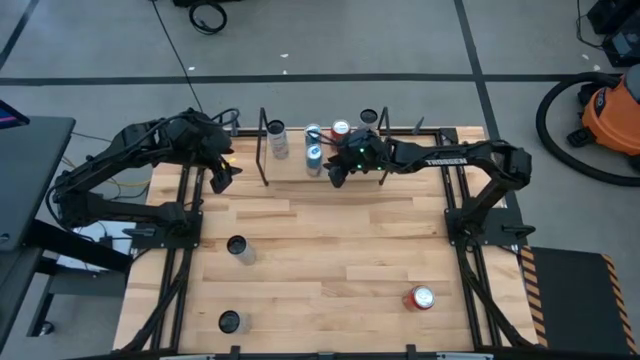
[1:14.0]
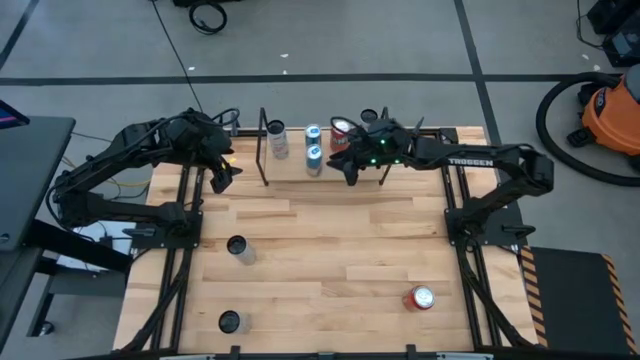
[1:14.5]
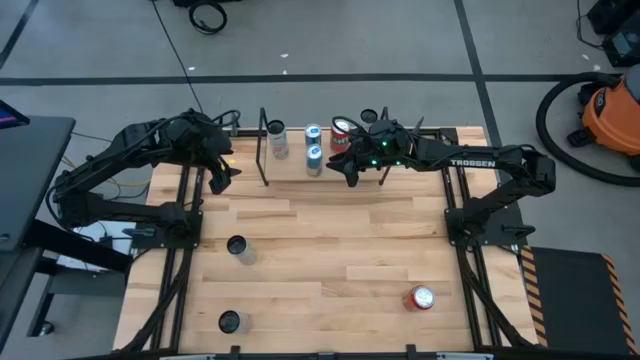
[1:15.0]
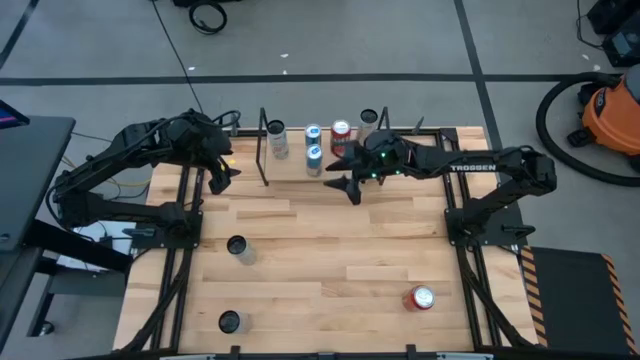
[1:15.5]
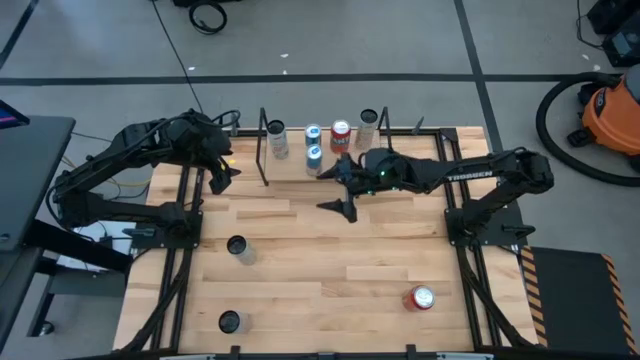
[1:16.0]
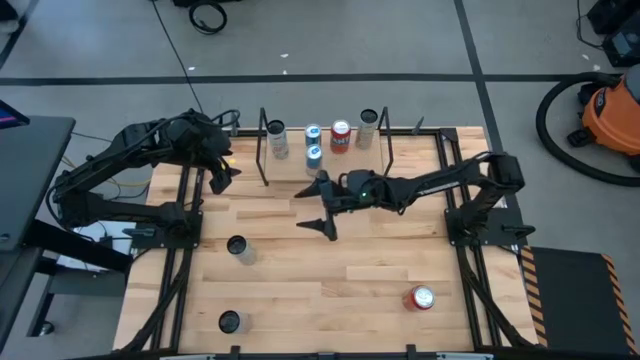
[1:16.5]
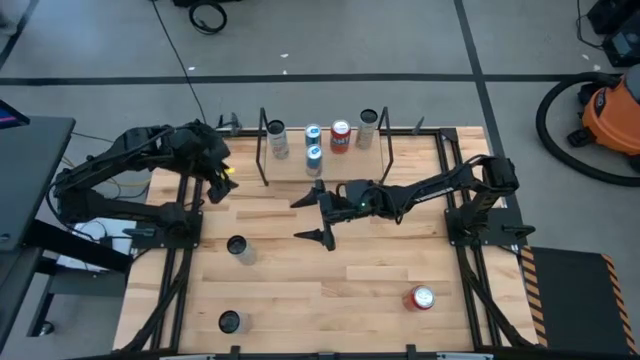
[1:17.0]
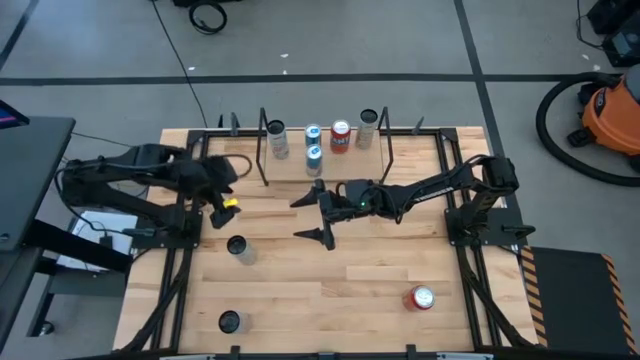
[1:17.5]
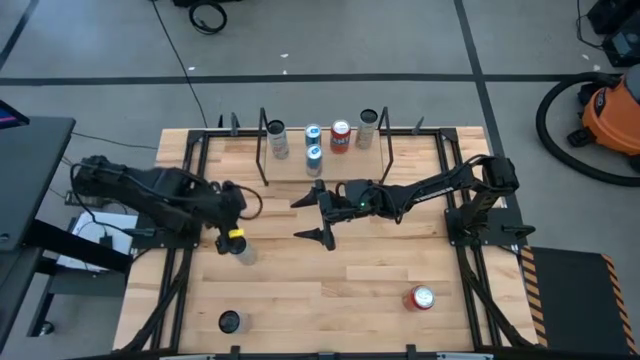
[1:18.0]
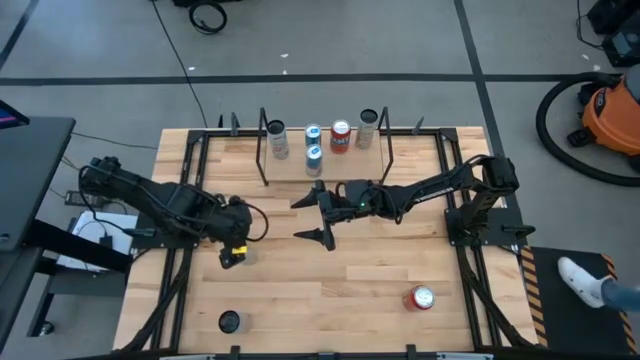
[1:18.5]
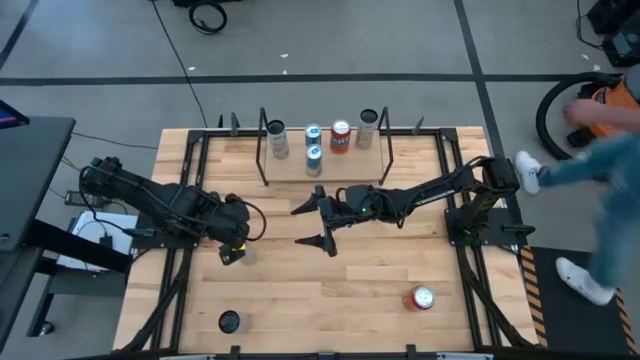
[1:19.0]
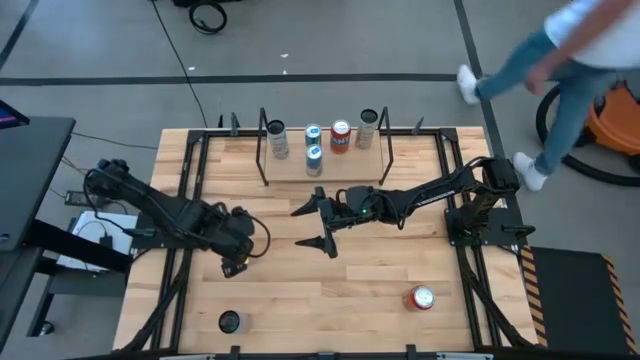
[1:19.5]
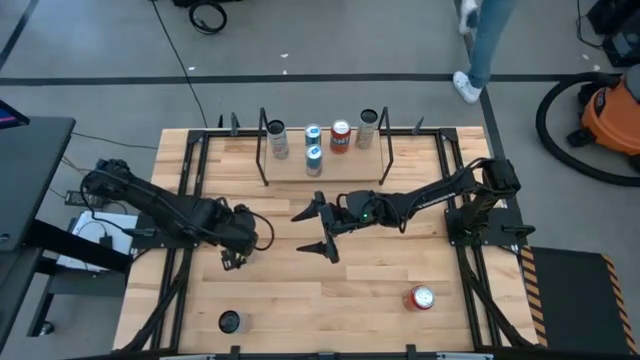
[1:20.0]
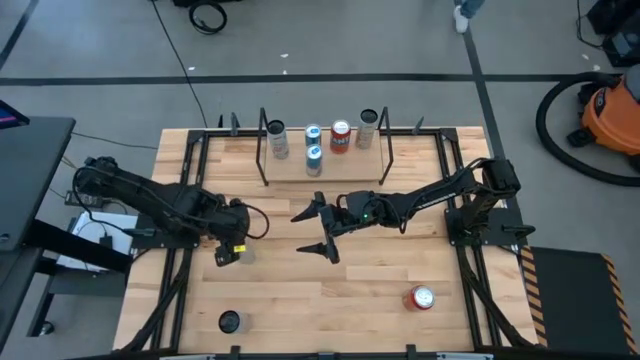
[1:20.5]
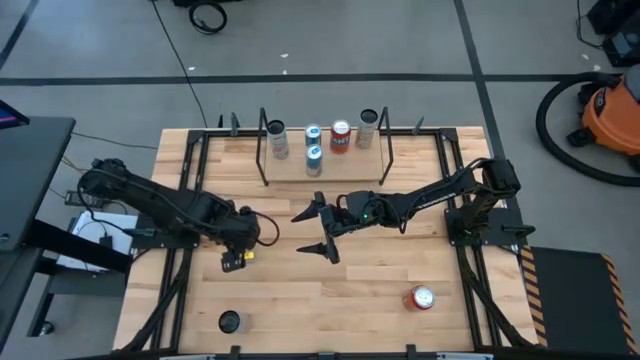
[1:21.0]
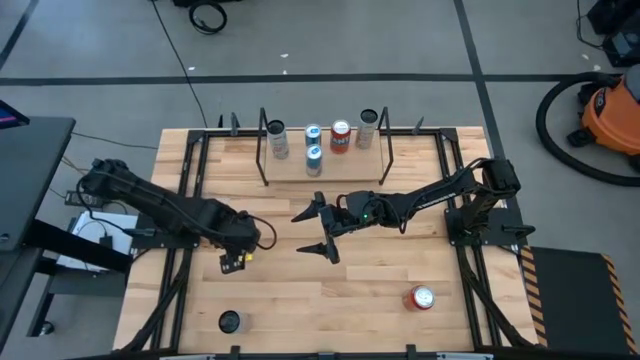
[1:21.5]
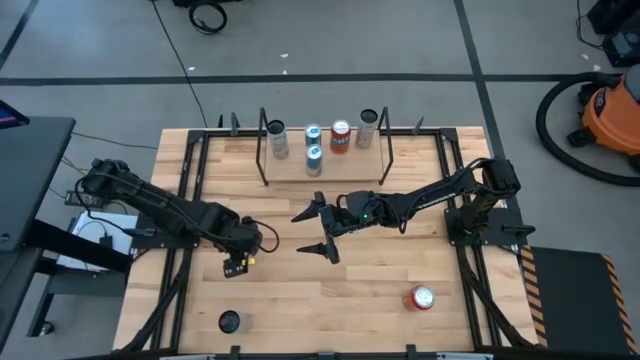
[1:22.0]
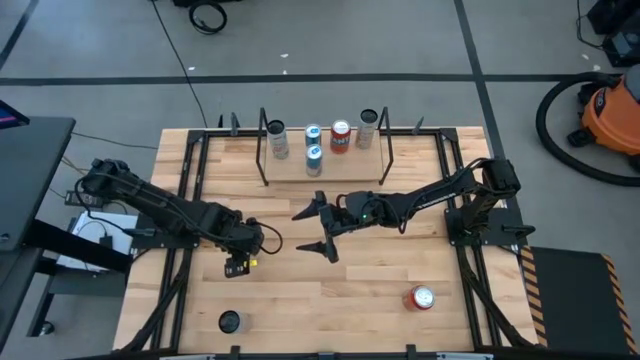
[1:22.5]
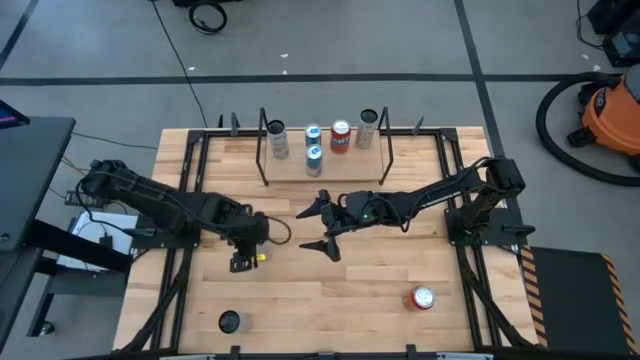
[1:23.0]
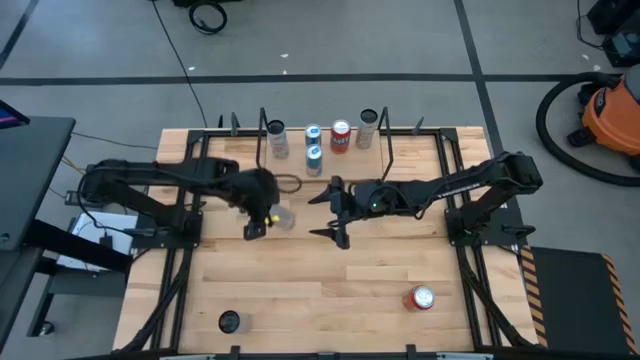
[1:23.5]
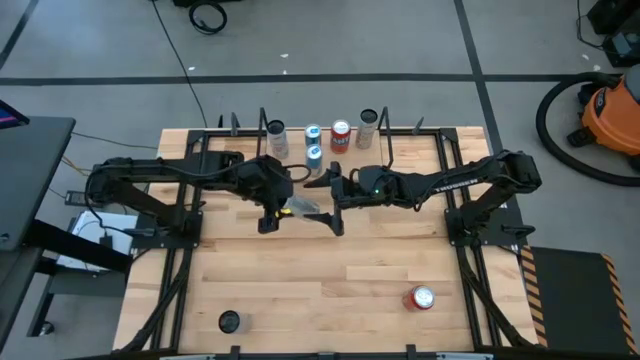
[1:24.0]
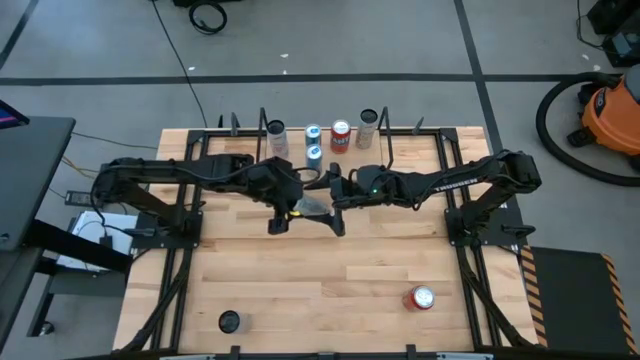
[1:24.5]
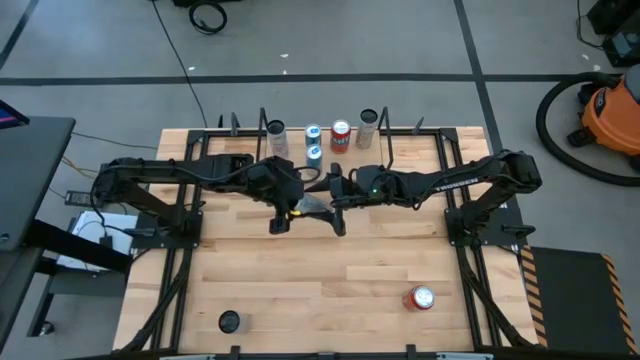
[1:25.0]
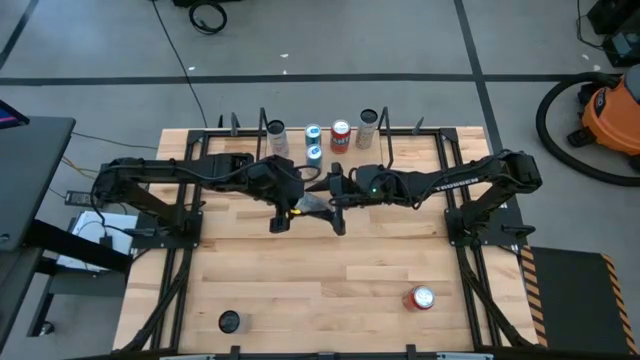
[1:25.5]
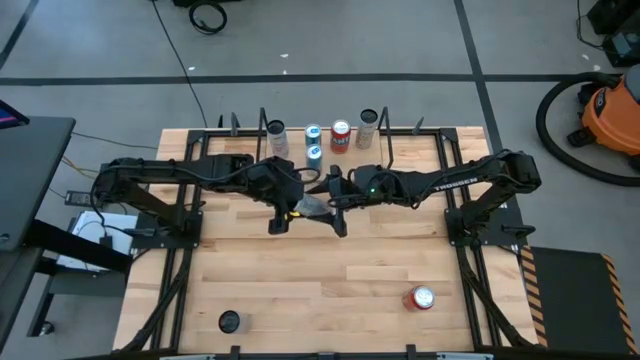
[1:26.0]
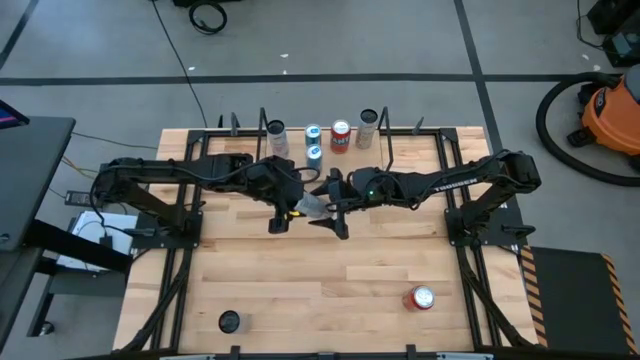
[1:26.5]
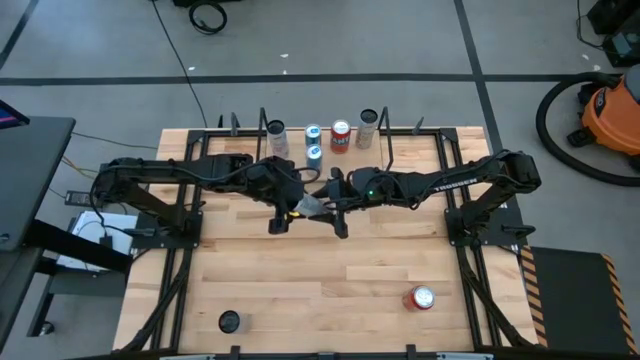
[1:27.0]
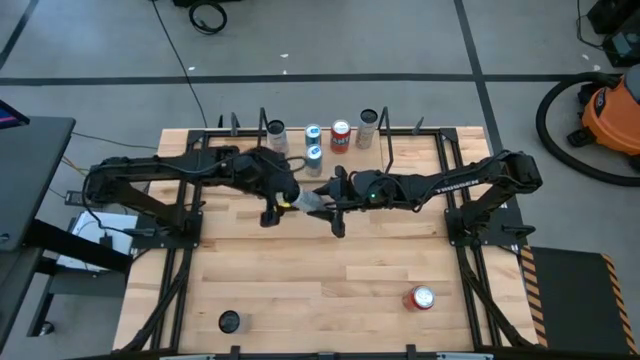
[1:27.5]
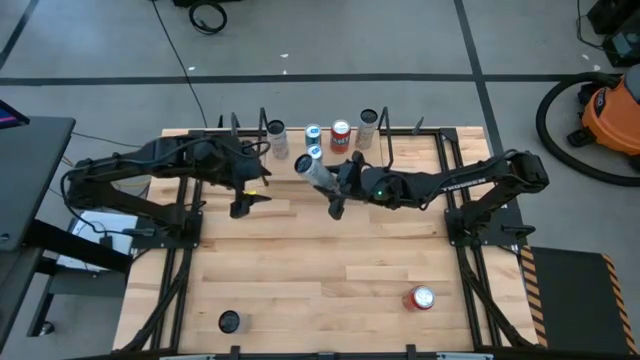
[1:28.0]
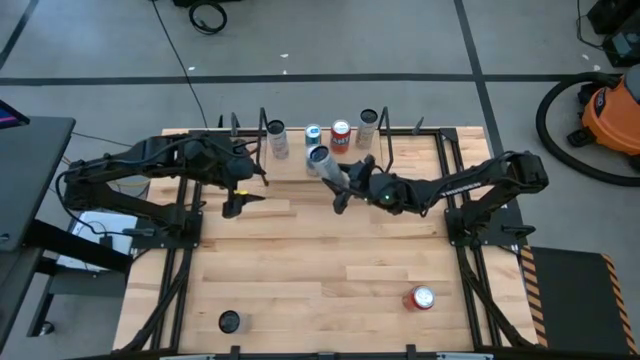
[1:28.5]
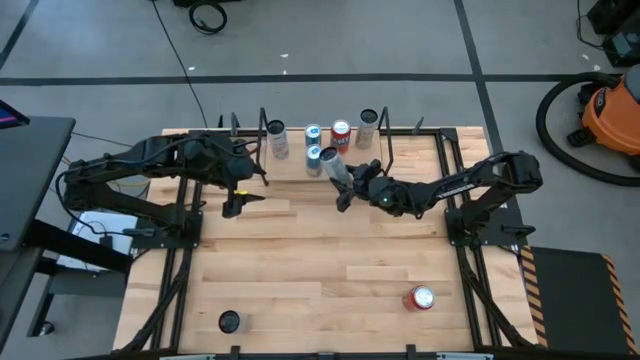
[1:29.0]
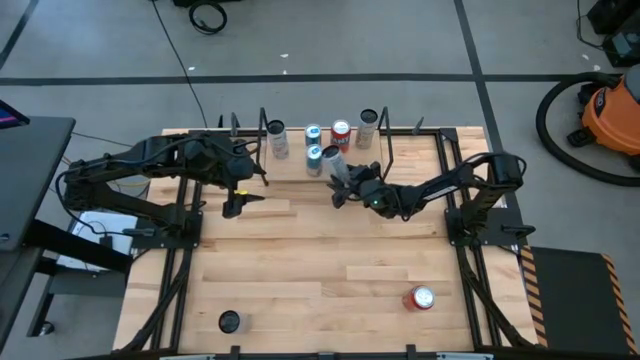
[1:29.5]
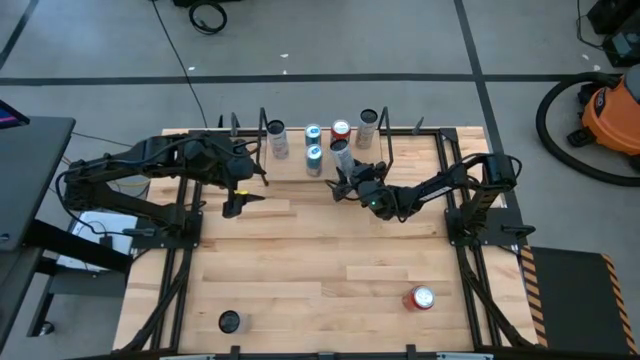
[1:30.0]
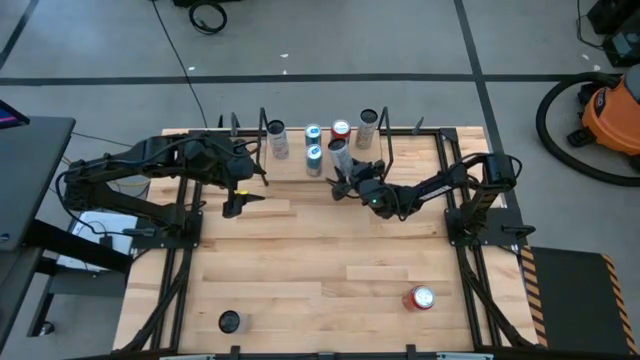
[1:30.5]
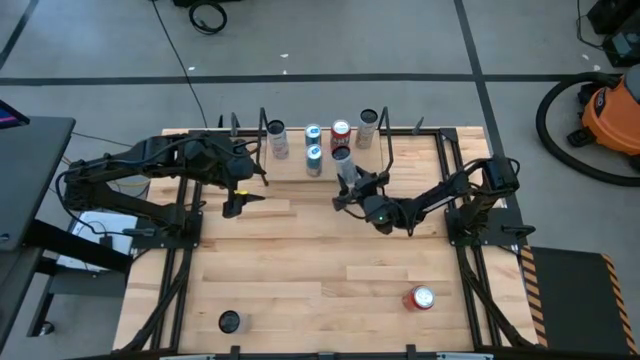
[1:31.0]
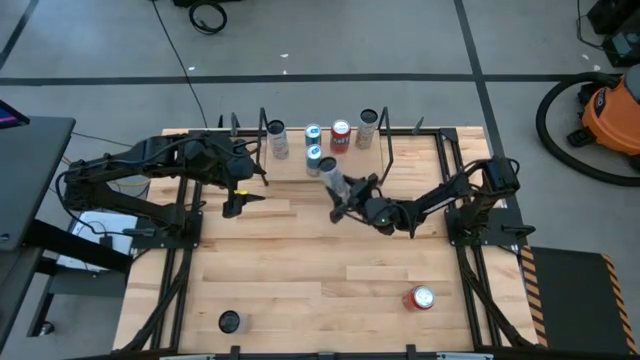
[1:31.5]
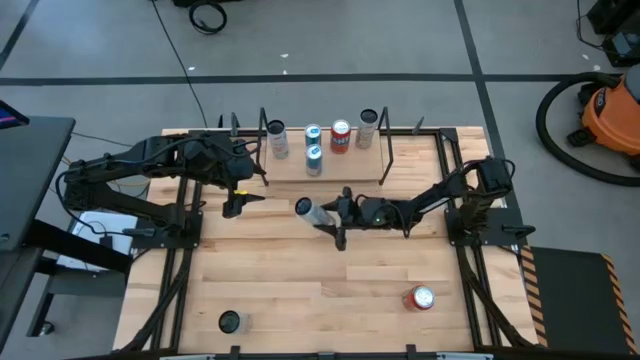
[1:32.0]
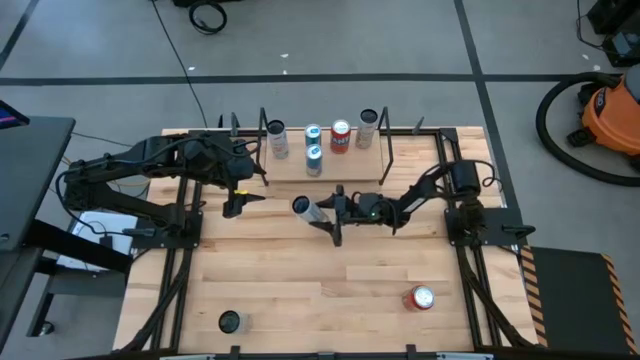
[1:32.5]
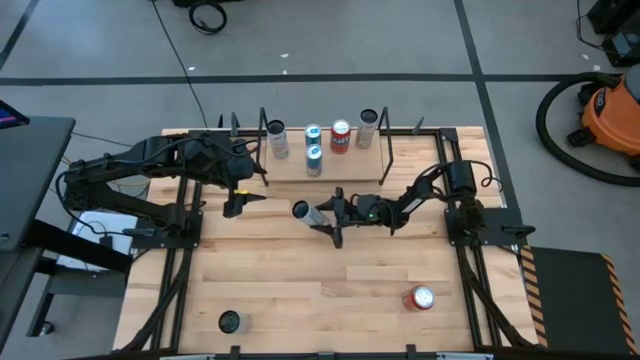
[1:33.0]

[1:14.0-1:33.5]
Task: Place canned beverage on shelf
Put the white yellow soda can on the shelf aligned with the other white yellow soda can

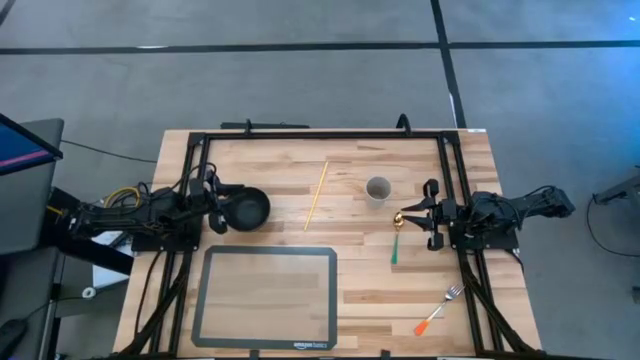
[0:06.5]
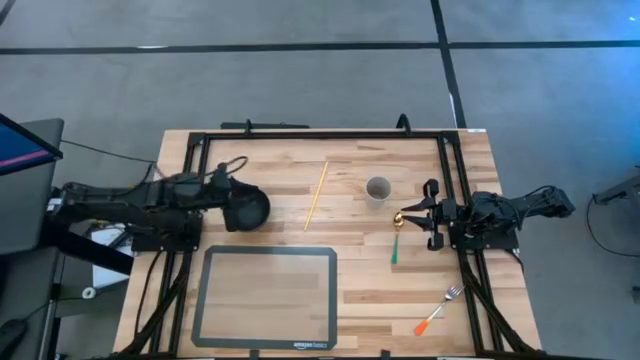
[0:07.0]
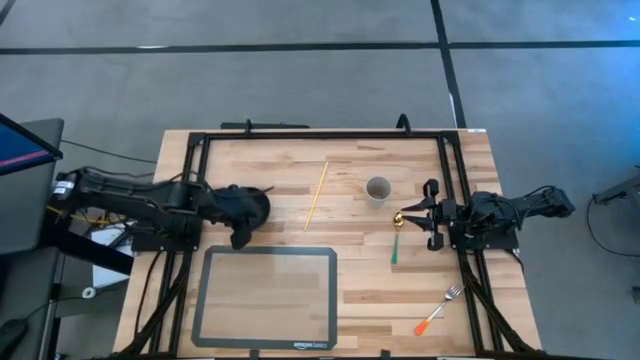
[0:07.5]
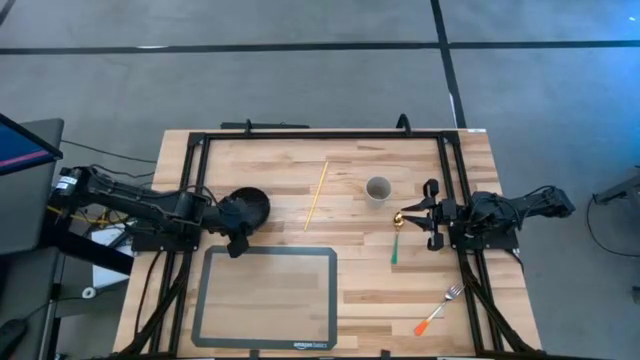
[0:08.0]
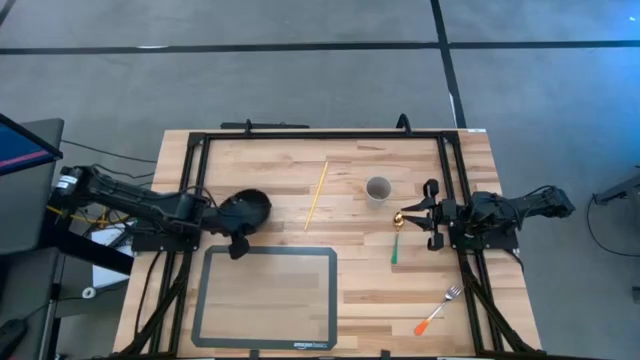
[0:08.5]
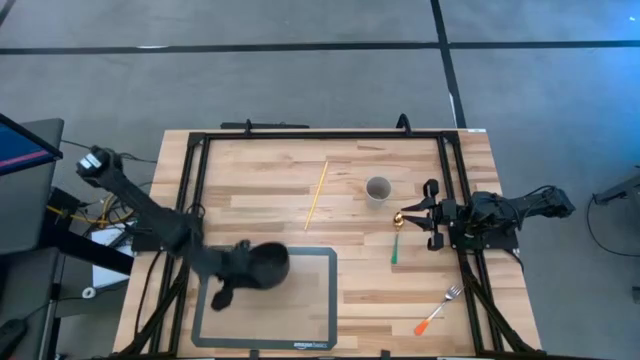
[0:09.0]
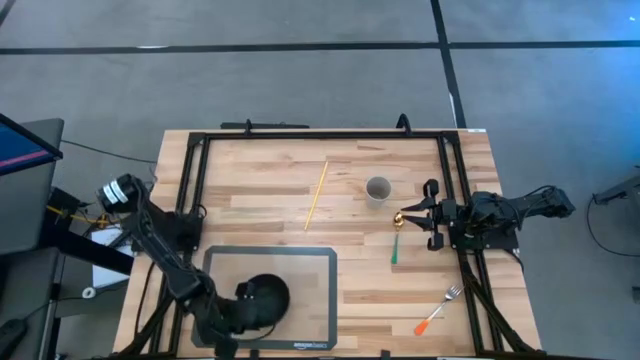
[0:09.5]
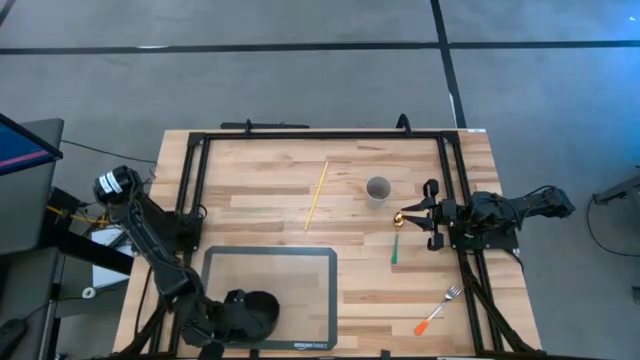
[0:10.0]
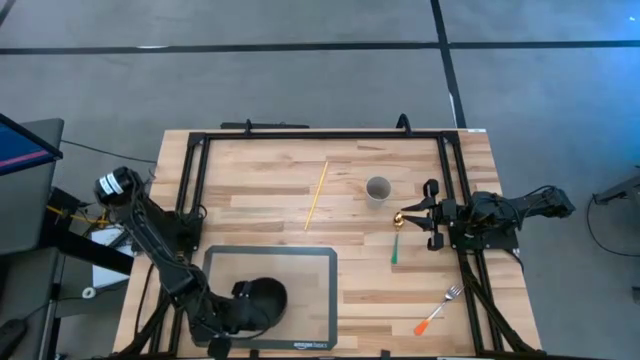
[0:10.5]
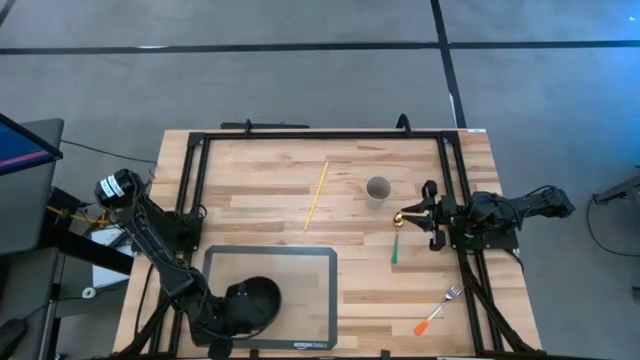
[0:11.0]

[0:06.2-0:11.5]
Task: Pick & Place Utensil
Put the black bowl on the transparent mat
